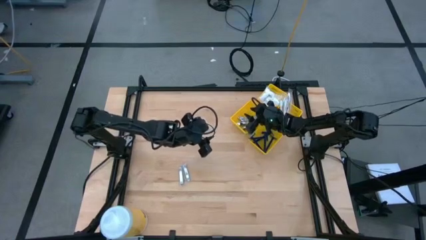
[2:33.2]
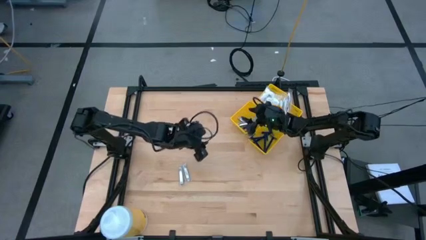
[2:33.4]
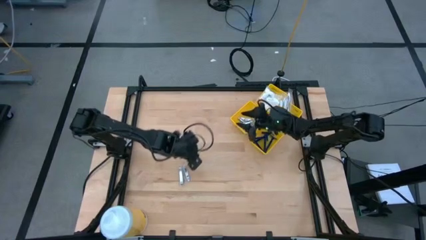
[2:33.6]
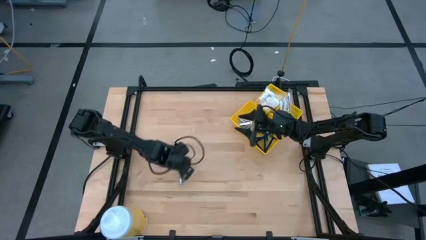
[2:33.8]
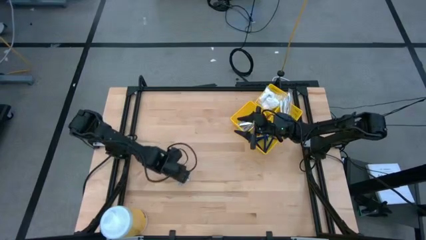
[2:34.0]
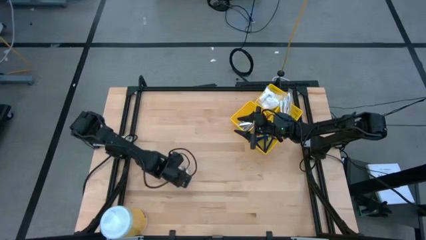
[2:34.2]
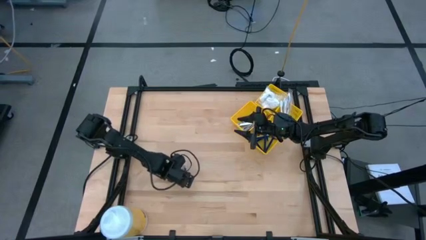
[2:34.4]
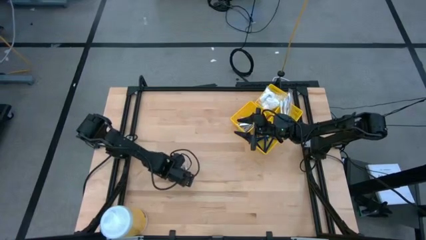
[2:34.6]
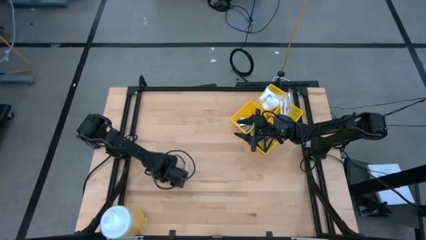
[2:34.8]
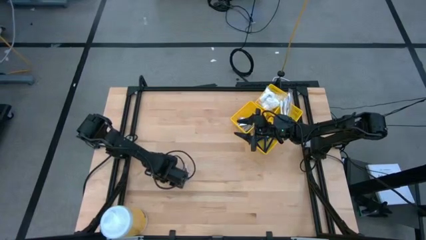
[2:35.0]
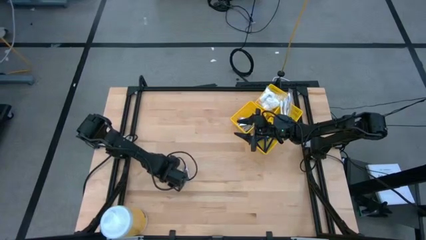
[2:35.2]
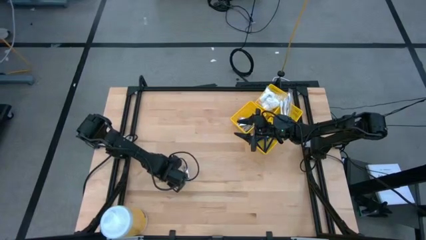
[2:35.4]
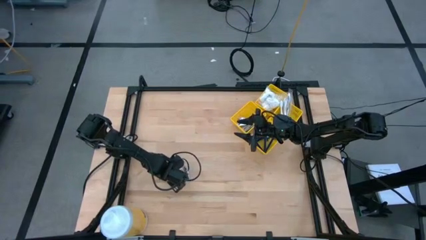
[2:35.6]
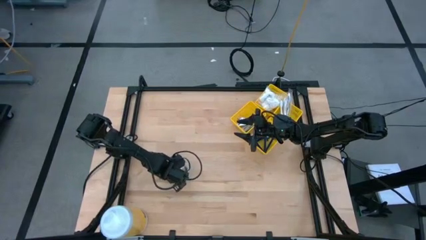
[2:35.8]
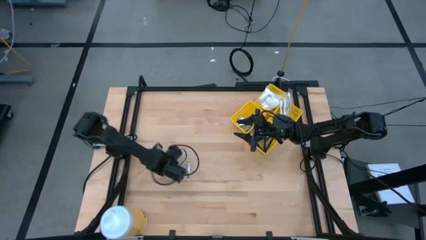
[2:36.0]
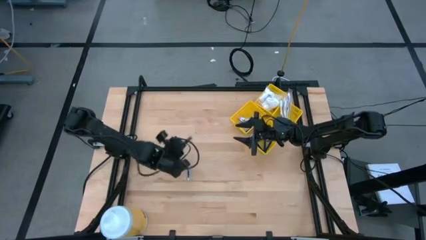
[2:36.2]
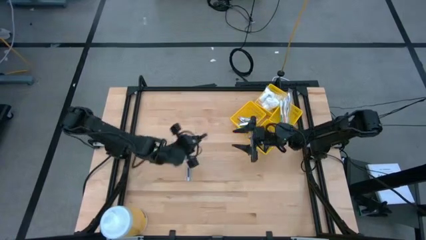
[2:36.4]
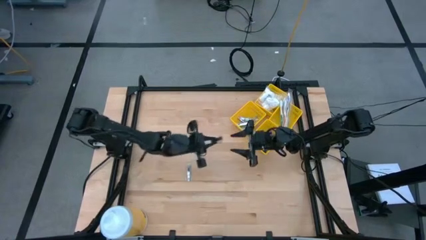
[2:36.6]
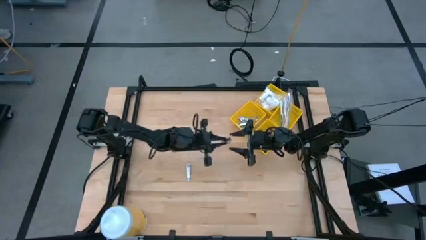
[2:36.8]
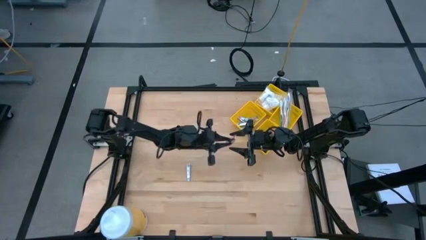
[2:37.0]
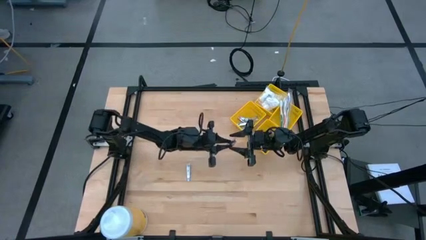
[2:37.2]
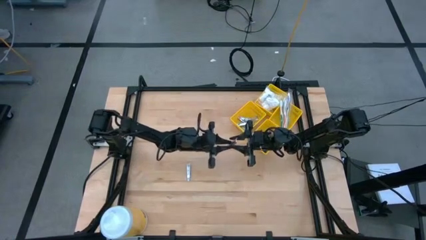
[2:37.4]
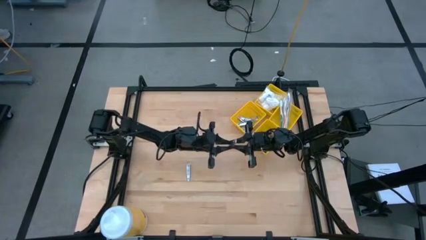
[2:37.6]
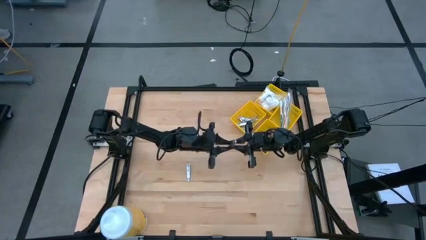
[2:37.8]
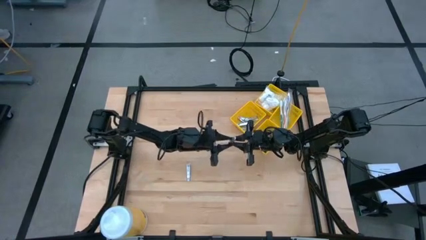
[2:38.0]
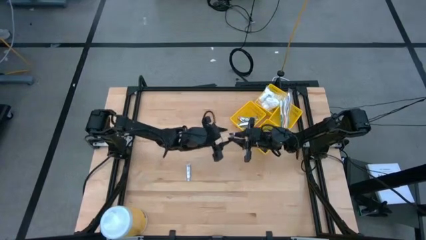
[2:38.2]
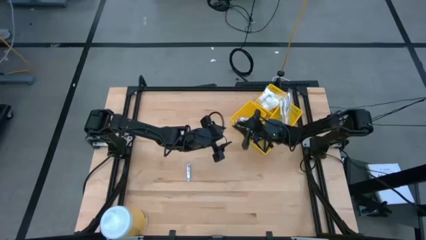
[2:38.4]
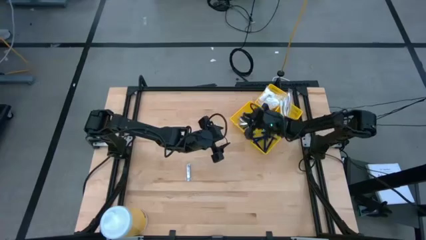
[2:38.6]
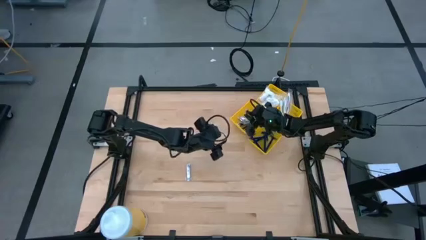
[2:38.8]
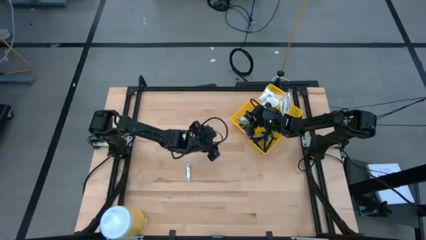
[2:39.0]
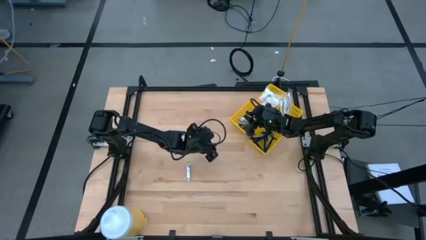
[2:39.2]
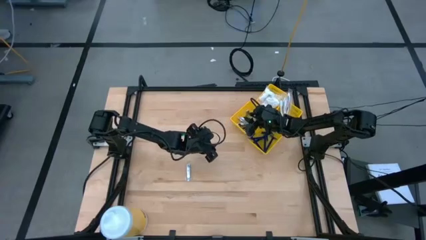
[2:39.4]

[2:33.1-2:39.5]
Task: Pick & Place Travel size toiletries
Put the nail cutter into the bottom left yellow bin

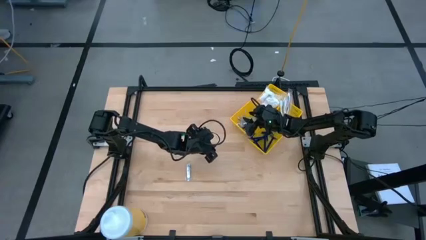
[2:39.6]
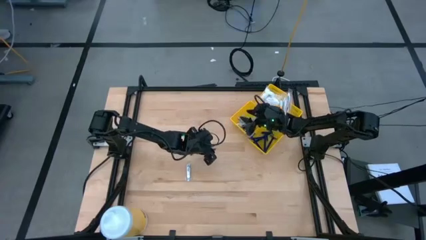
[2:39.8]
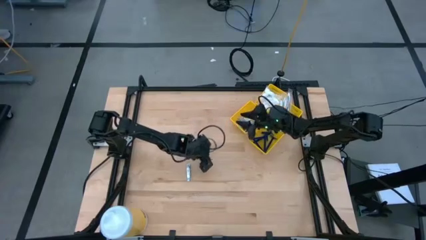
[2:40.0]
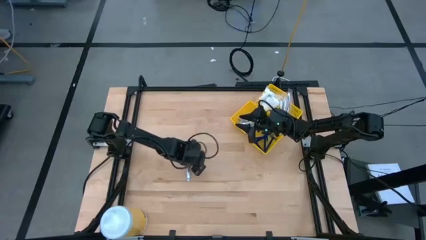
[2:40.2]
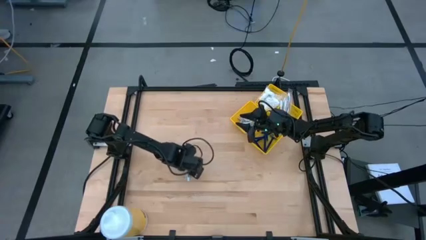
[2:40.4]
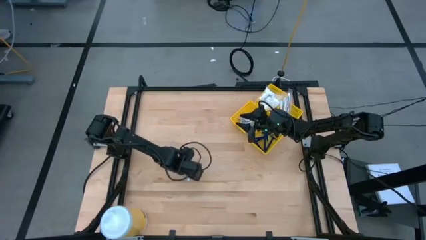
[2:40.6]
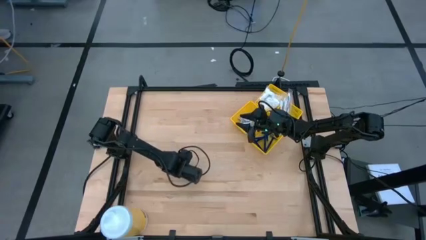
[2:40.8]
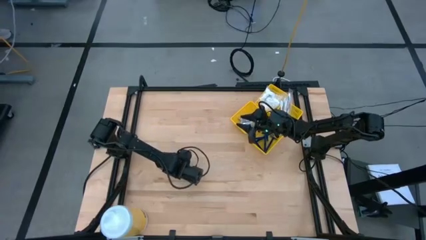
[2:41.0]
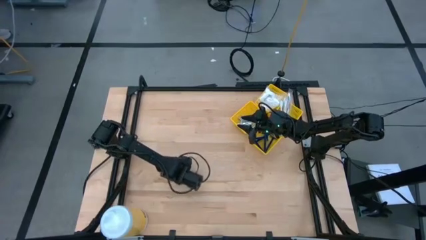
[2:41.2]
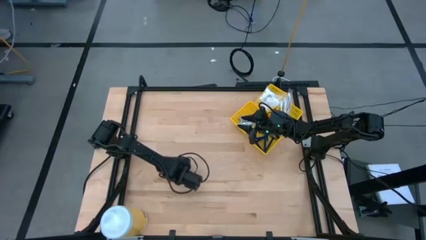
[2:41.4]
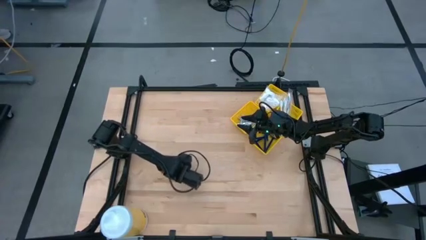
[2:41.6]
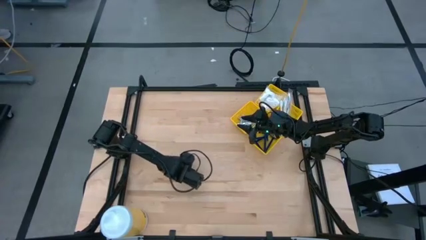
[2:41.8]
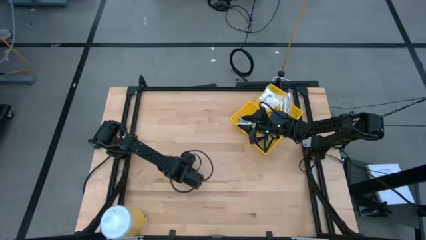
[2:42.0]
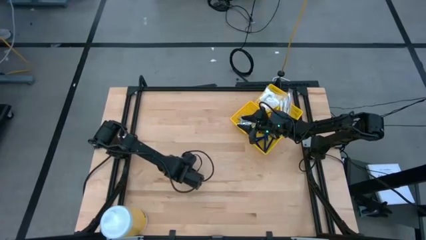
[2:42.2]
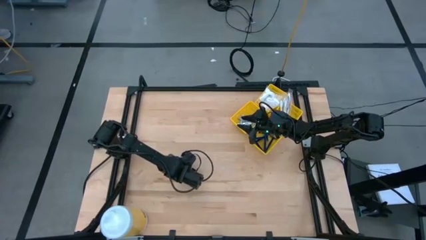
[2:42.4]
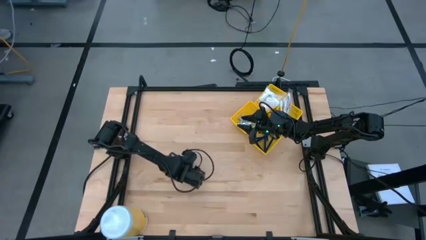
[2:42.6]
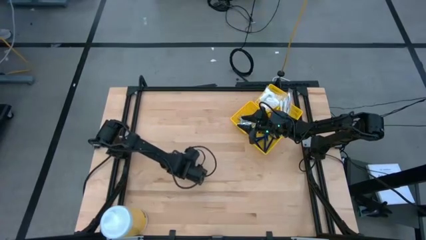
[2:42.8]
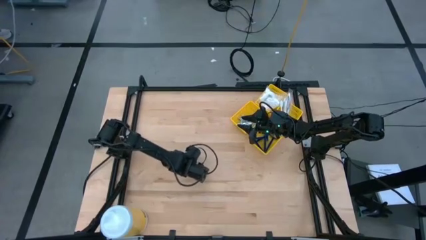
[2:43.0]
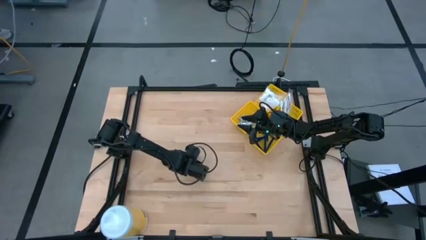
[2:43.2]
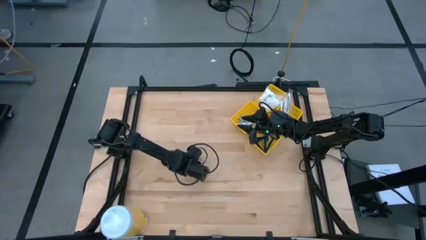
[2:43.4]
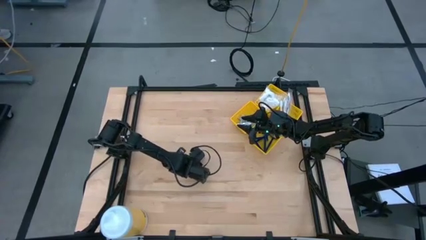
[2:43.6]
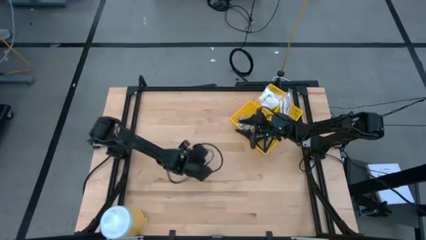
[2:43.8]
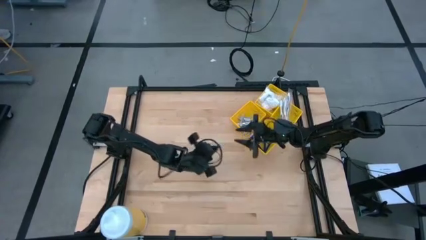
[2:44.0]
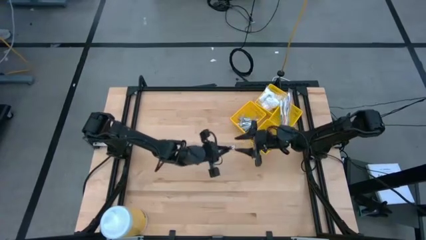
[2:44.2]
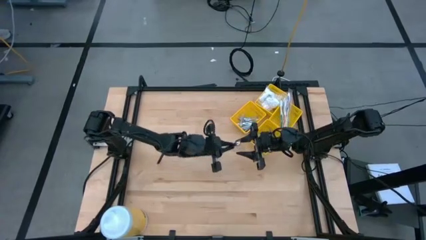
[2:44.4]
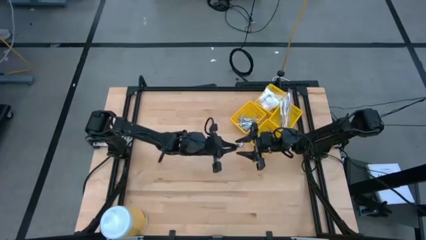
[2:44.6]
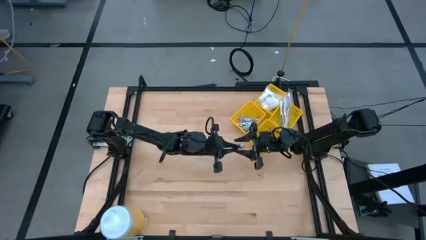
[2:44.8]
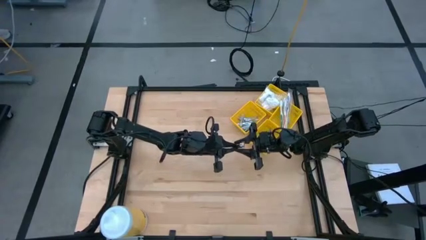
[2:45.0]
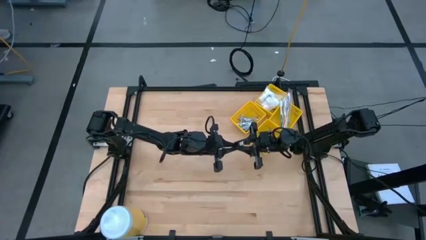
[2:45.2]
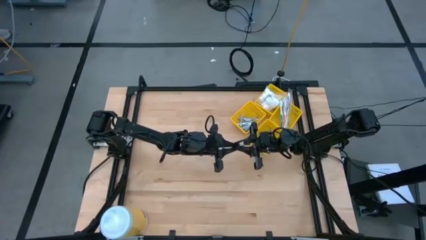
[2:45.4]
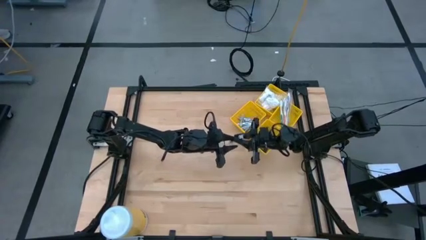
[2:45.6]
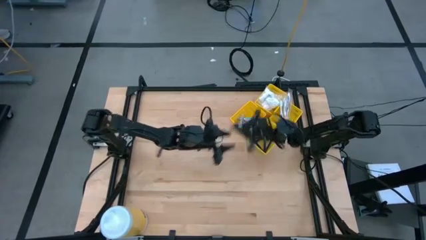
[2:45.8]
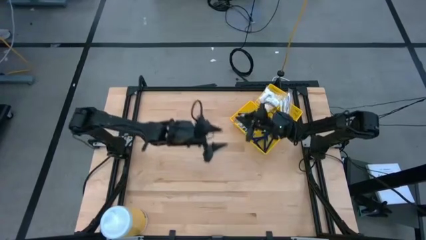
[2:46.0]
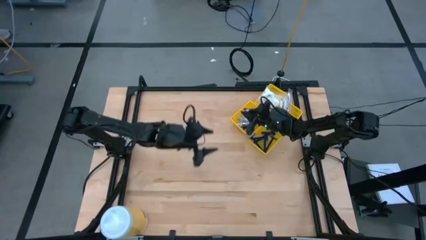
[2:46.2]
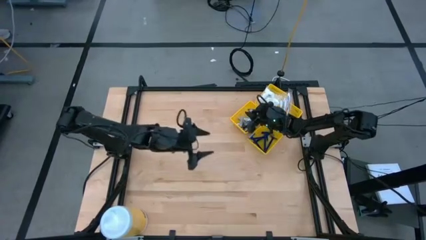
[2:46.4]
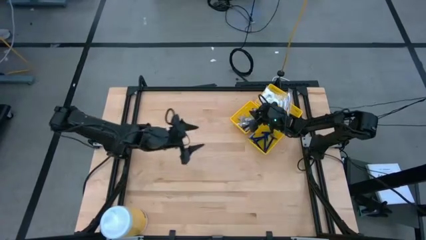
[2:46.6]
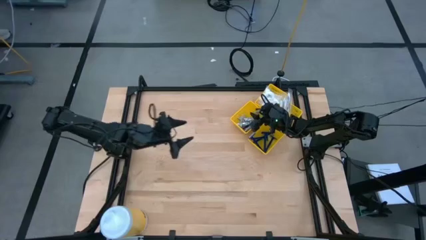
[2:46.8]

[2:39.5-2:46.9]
Put the nail cutter into the bottom left yellow bin

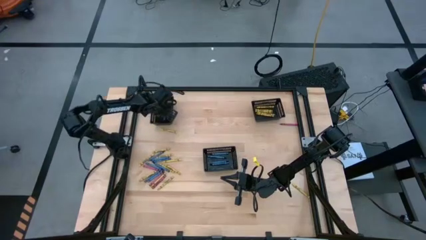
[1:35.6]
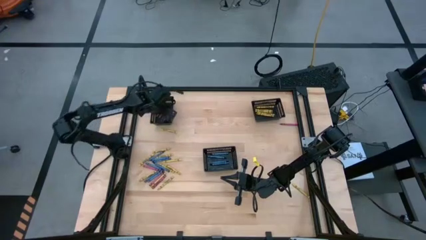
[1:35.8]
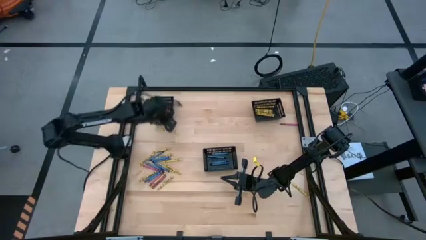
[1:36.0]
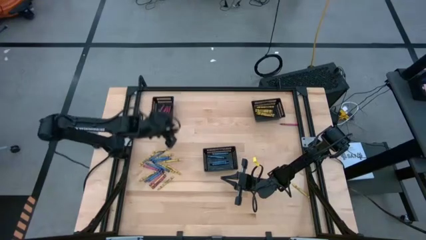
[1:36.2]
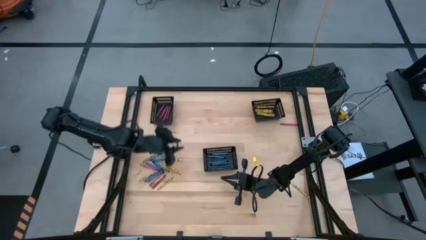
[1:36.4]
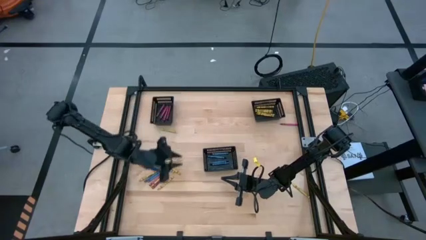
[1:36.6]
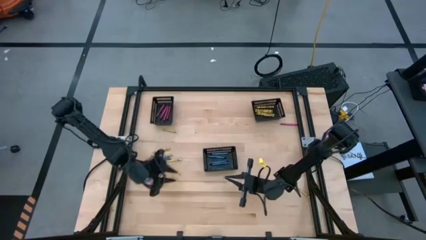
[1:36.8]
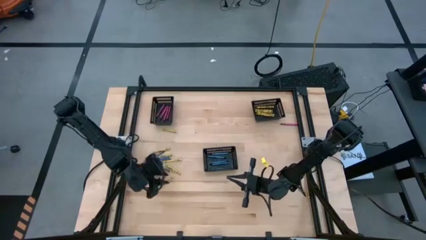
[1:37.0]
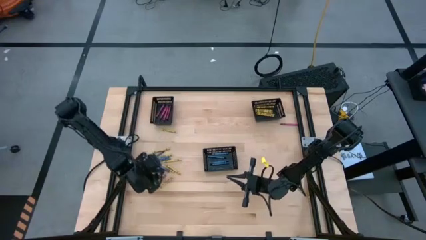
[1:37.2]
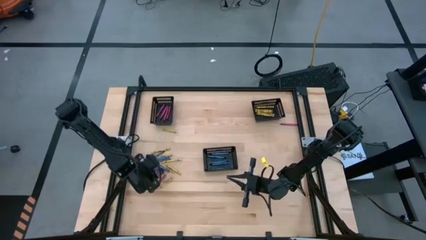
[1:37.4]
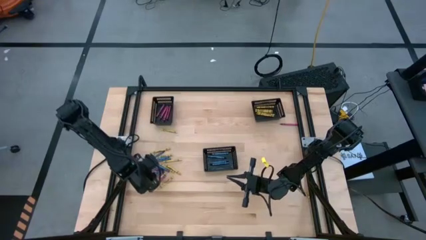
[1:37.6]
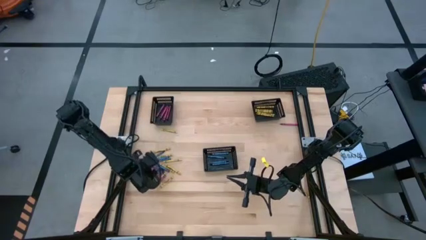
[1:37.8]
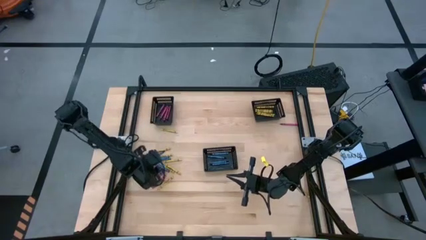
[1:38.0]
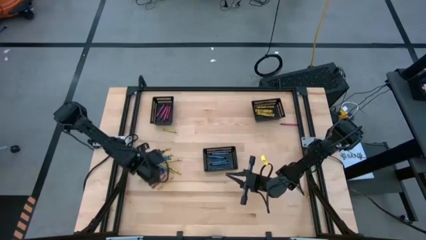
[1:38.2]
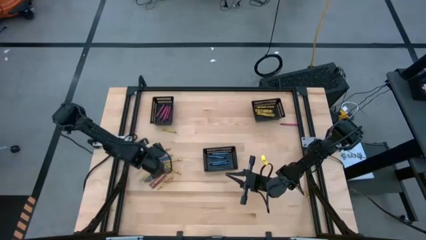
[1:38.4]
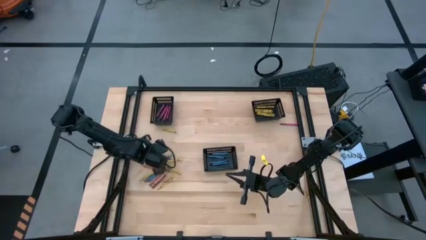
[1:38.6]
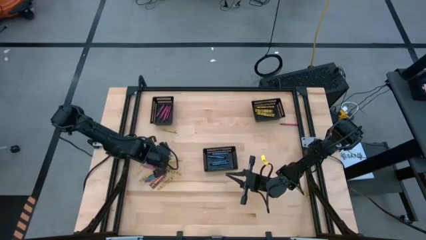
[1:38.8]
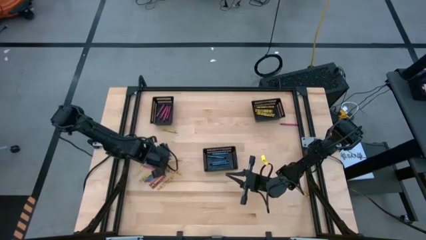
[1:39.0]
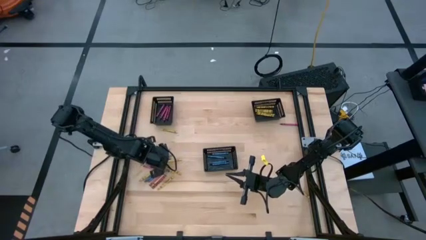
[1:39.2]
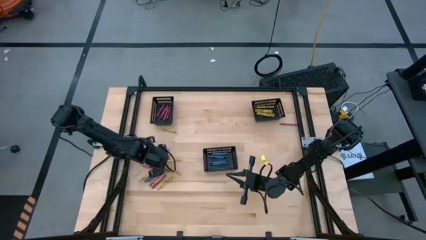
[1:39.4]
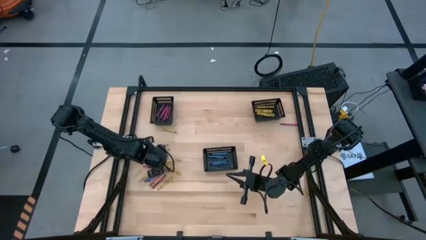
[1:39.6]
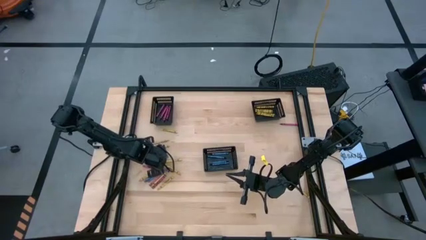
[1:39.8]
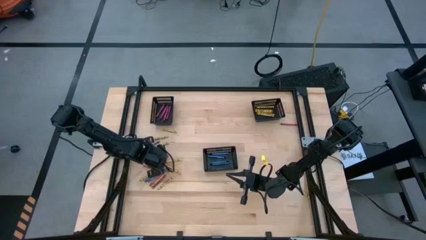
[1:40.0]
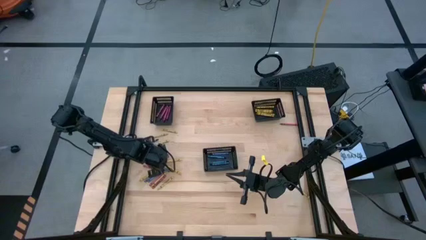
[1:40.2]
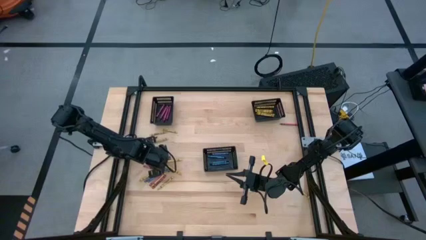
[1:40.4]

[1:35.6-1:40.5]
Task: Sort crayons
Put the blue crayon into the bottom black bin
